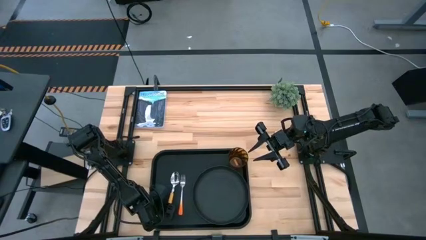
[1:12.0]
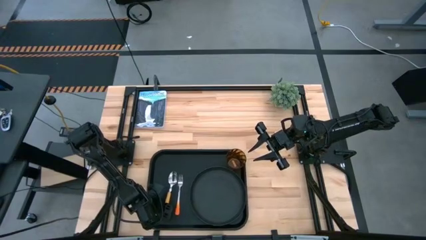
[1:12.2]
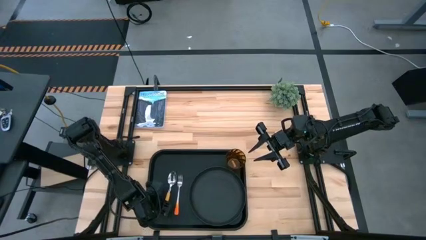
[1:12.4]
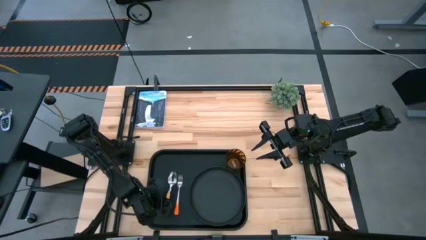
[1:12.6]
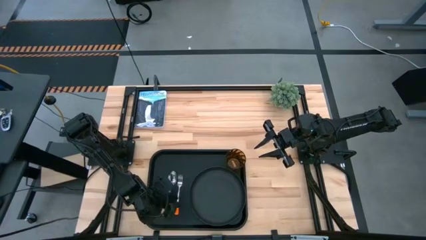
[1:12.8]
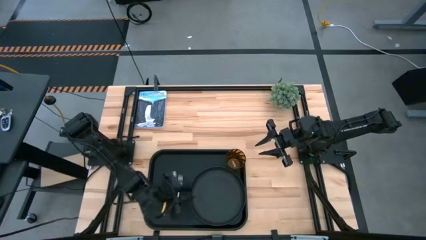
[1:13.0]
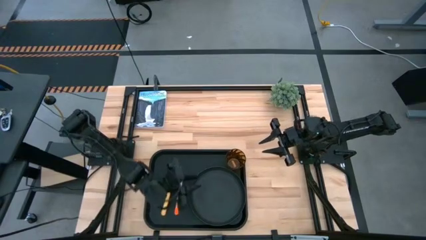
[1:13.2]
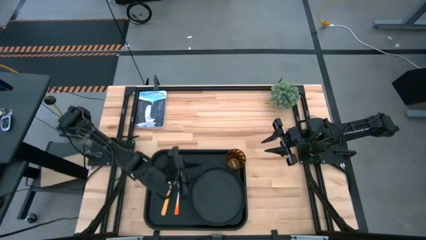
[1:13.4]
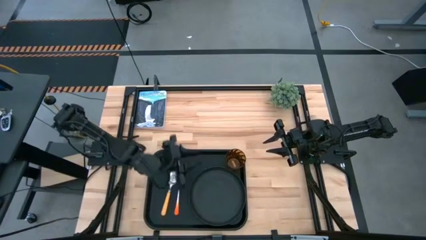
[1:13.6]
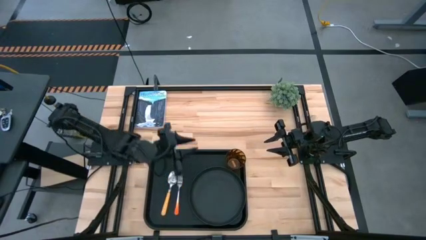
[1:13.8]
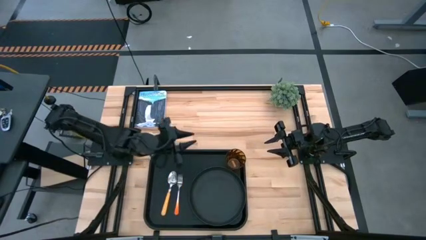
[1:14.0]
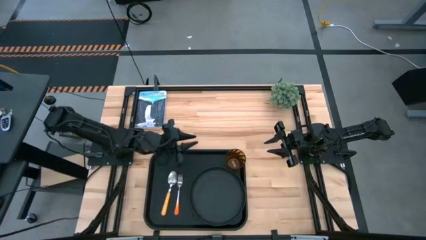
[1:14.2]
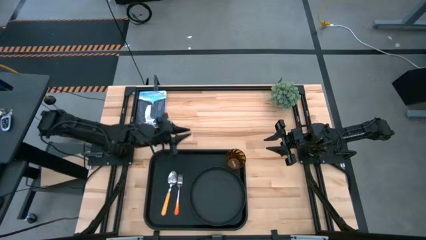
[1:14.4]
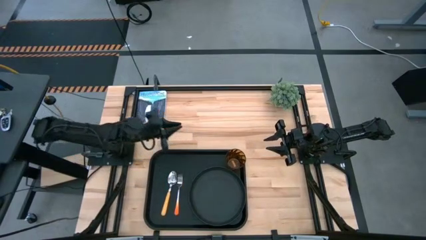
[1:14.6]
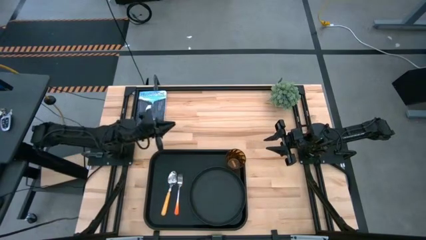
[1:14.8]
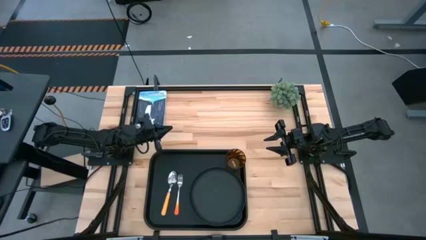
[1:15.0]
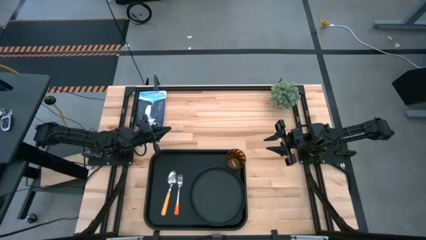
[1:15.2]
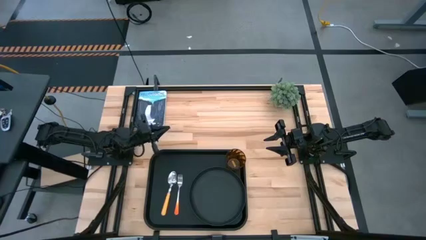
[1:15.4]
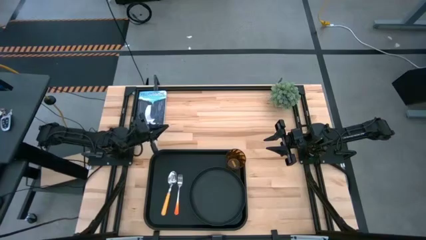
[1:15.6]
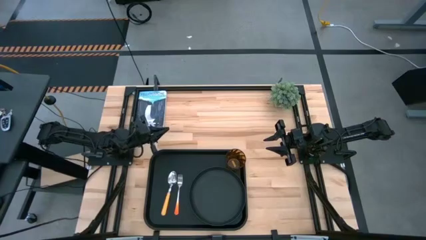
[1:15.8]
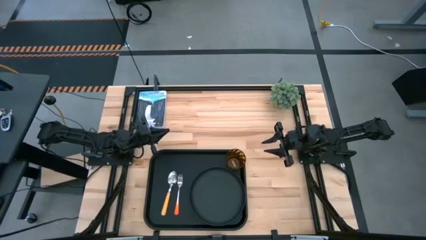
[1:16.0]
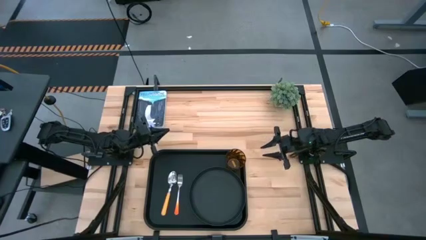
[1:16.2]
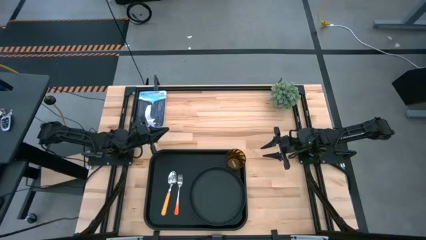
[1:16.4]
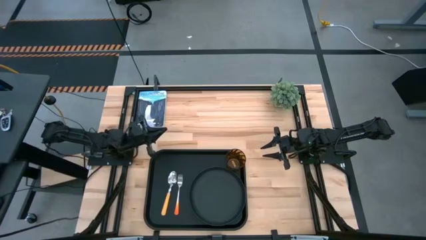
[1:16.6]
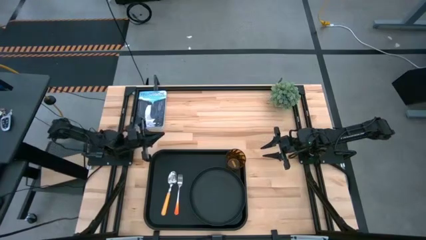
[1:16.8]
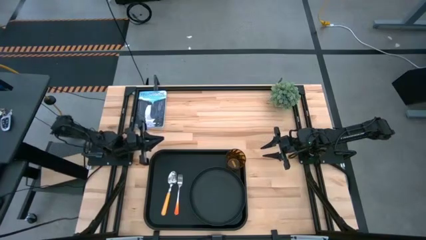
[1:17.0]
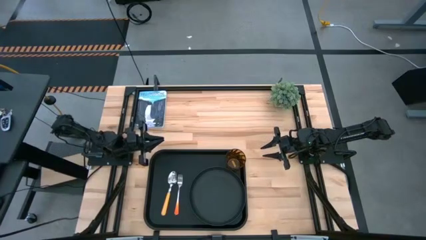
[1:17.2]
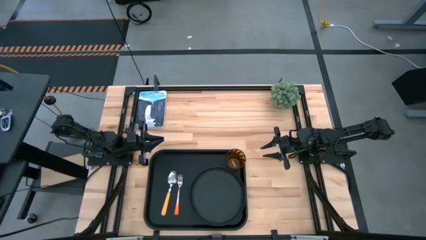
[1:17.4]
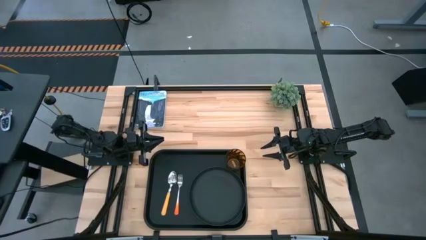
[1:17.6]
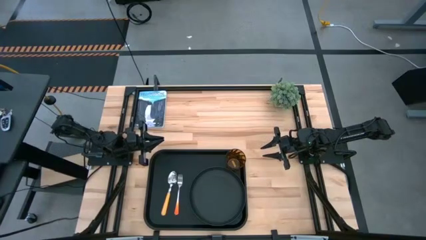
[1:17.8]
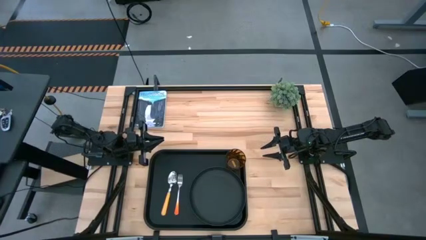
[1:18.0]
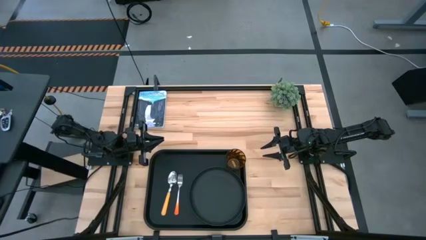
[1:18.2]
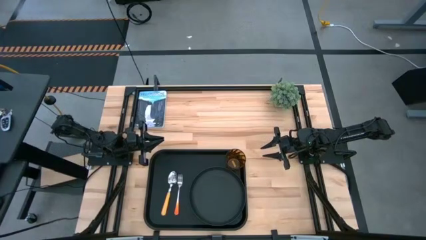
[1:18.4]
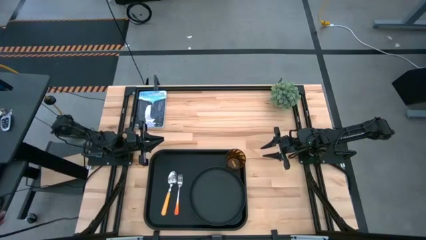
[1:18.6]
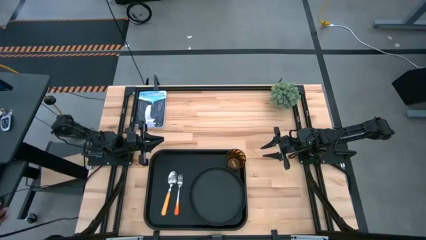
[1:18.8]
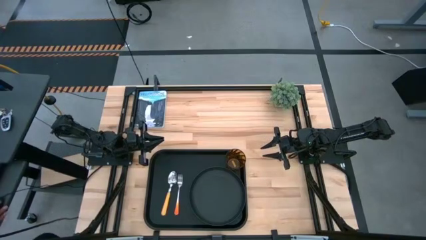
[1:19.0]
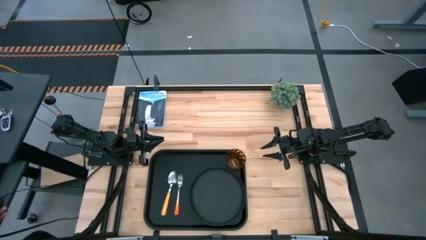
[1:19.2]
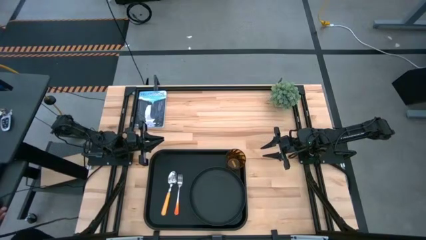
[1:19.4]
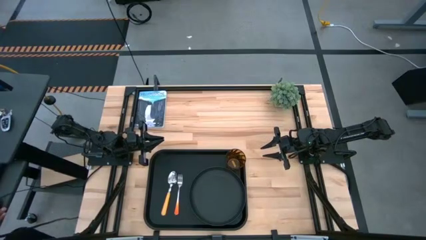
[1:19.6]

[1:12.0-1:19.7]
Task: Pick and place plate/cup/fork/spoon on tray
Return to Home Position
